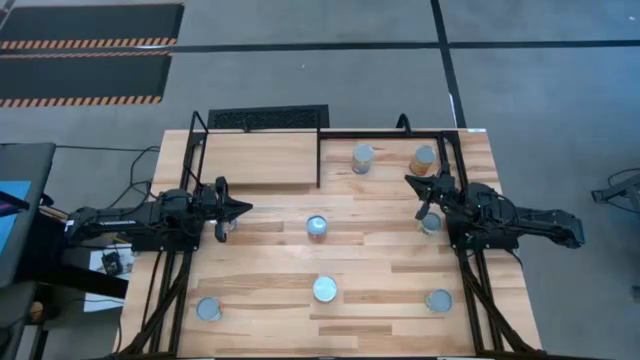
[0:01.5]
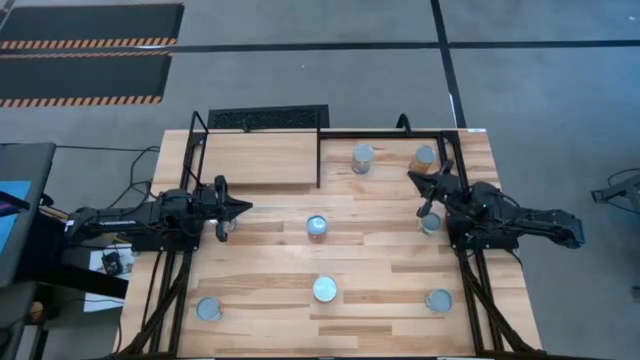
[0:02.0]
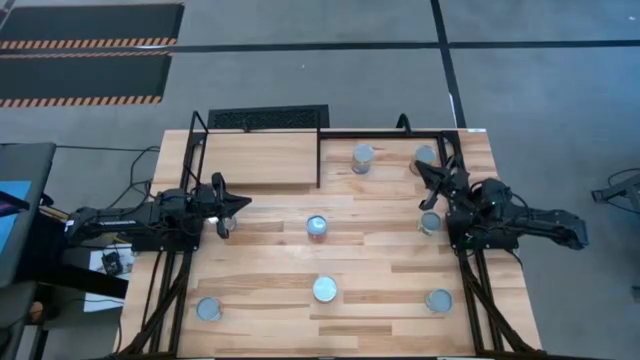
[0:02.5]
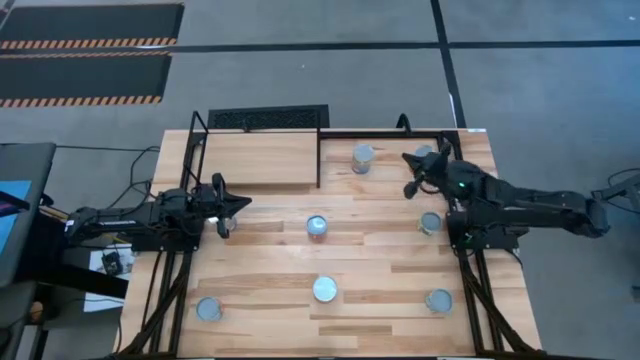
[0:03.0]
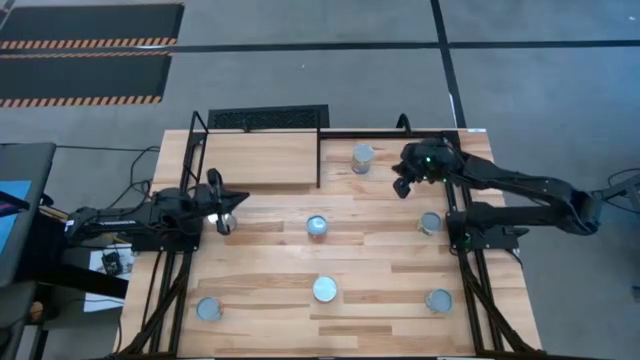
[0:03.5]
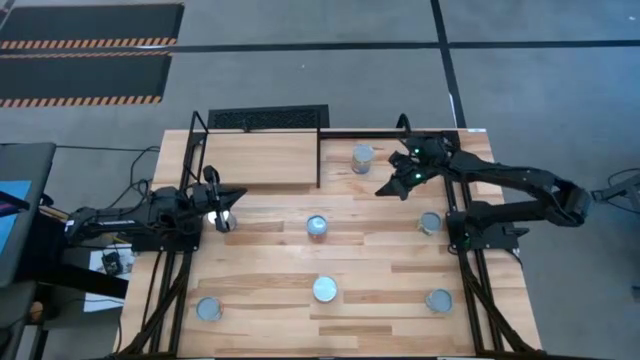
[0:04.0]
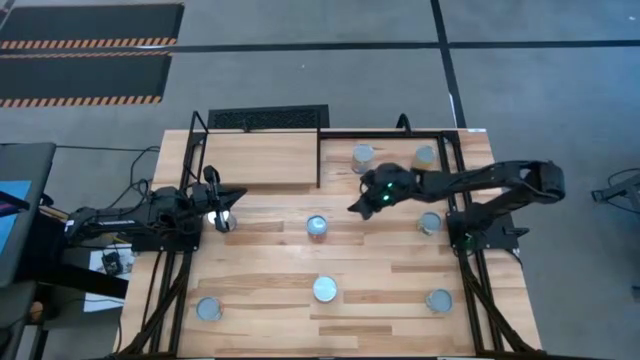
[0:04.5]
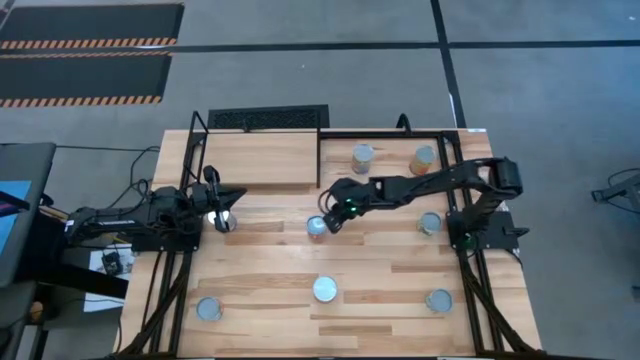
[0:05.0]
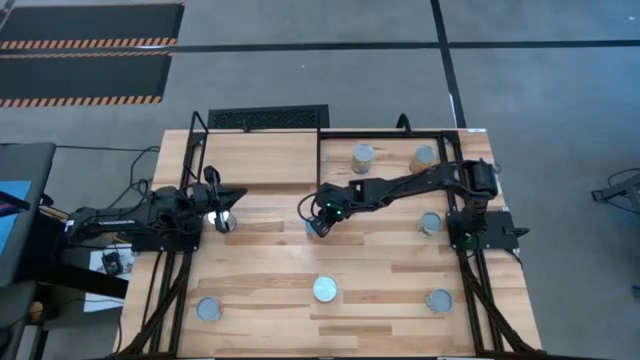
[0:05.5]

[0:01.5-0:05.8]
Task: Pick and place cans onto a shelf
Put the canned corn on the shelf

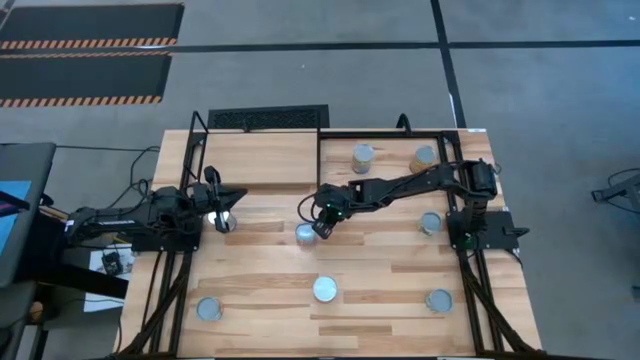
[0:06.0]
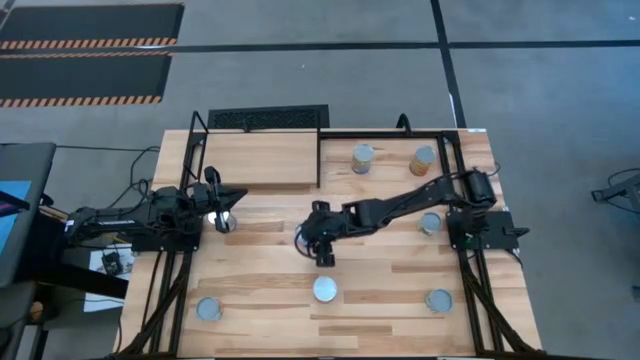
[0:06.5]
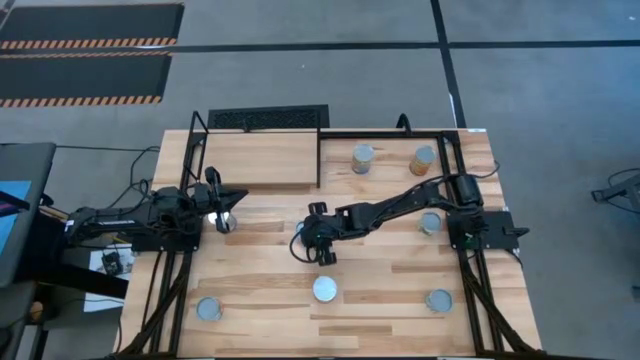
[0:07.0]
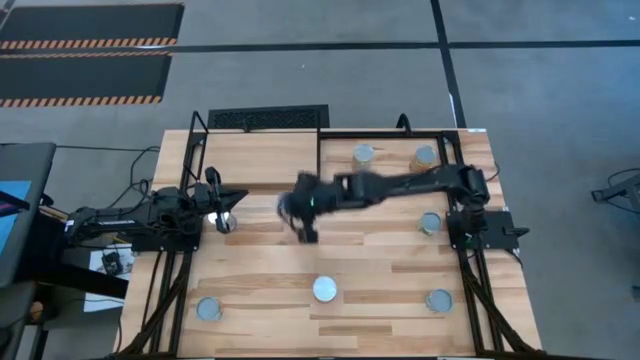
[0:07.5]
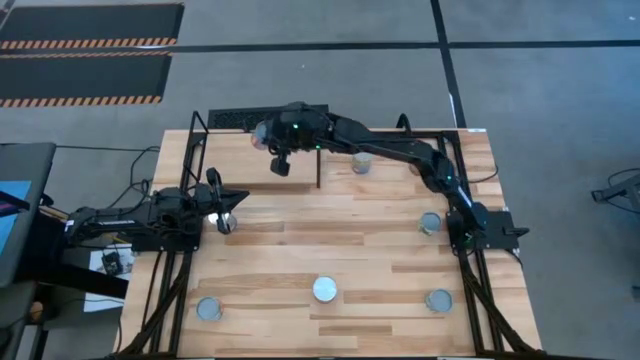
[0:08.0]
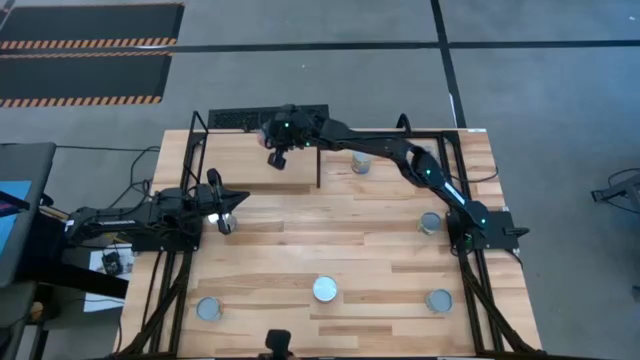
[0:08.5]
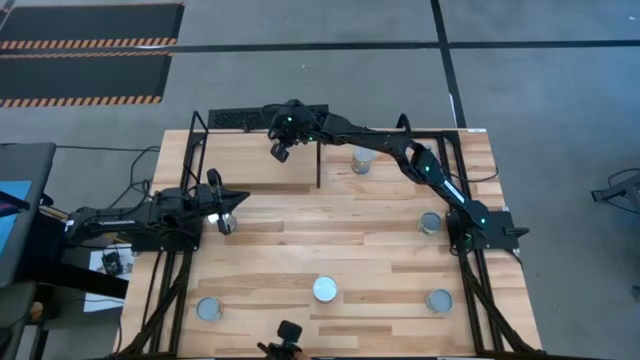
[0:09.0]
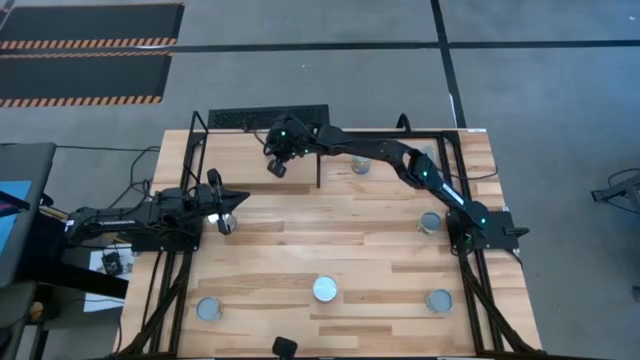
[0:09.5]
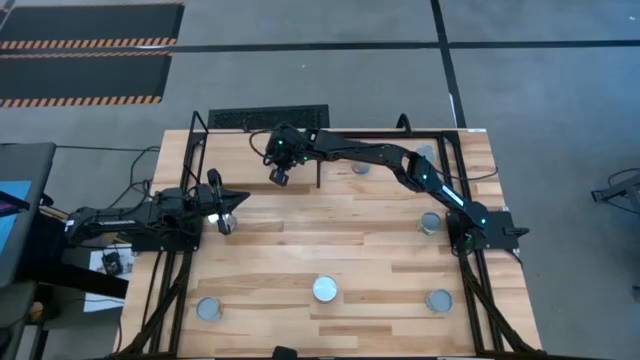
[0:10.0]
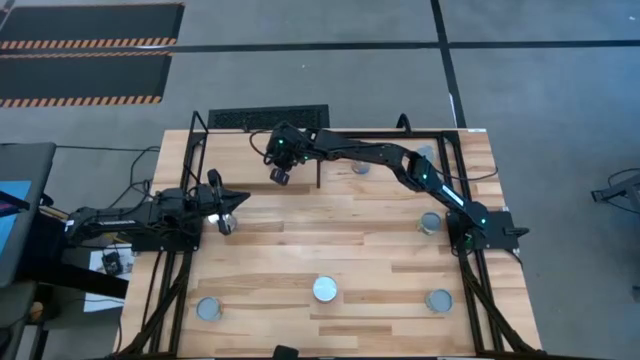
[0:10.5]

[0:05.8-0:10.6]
Put the canned corn on the shelf

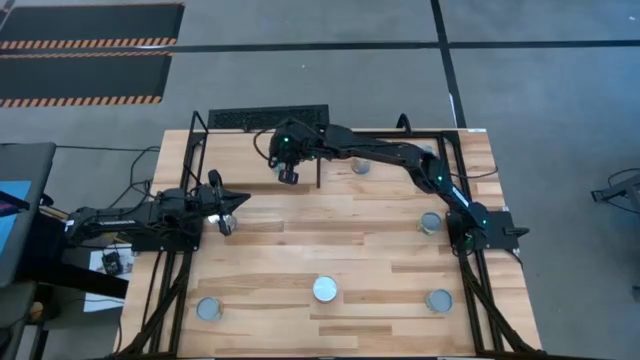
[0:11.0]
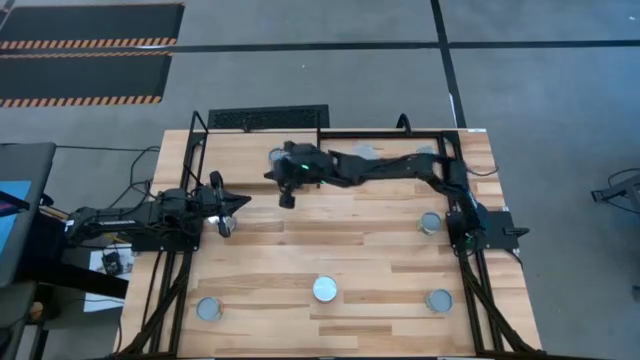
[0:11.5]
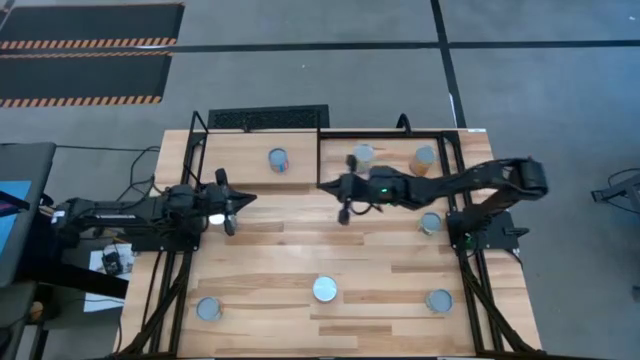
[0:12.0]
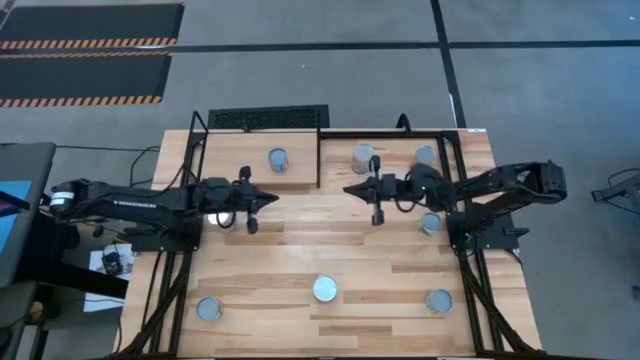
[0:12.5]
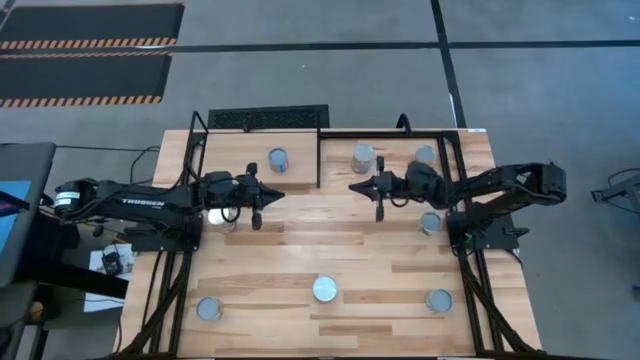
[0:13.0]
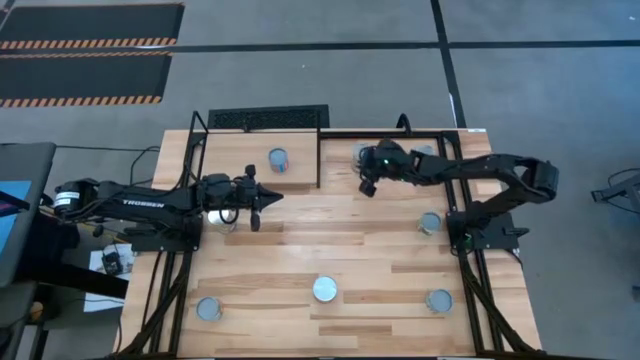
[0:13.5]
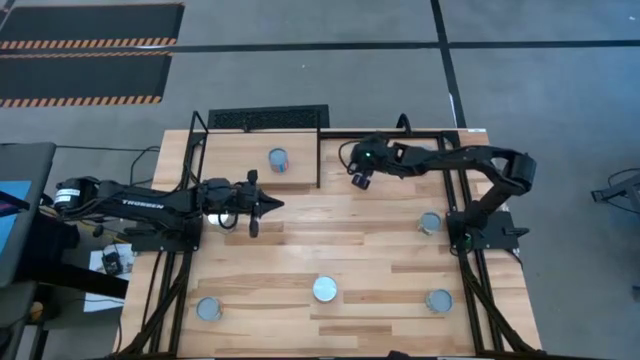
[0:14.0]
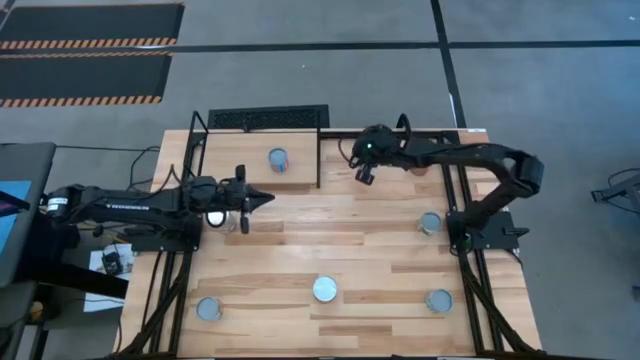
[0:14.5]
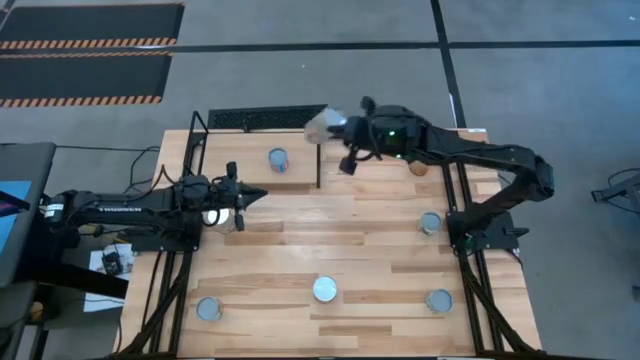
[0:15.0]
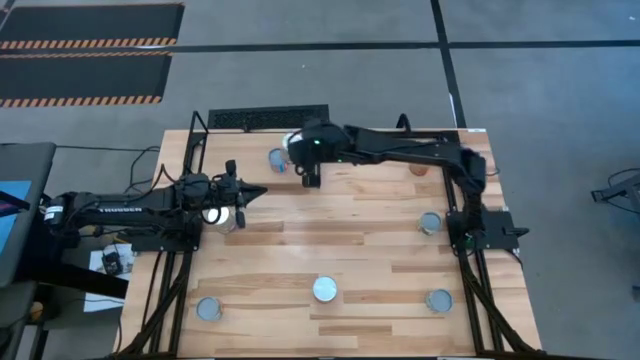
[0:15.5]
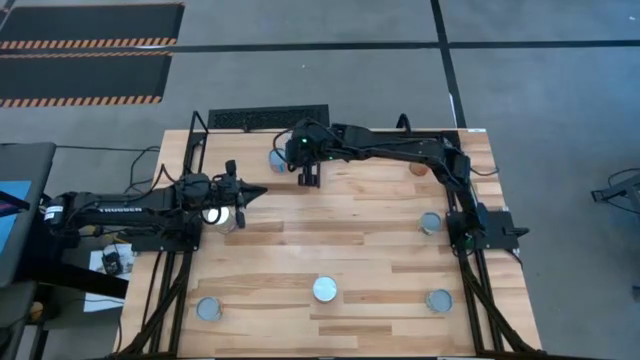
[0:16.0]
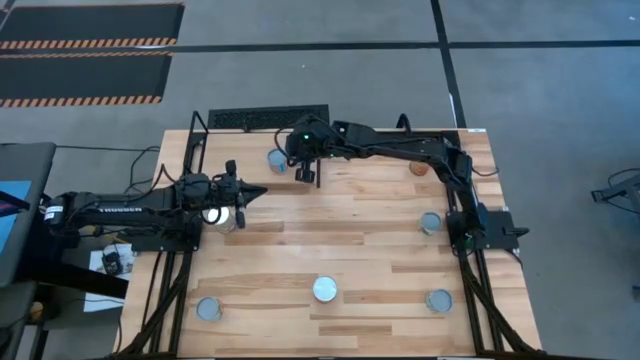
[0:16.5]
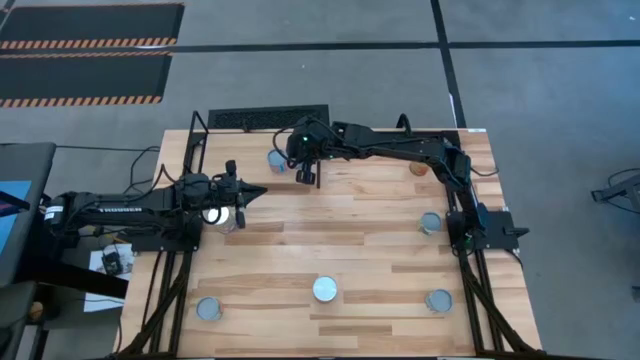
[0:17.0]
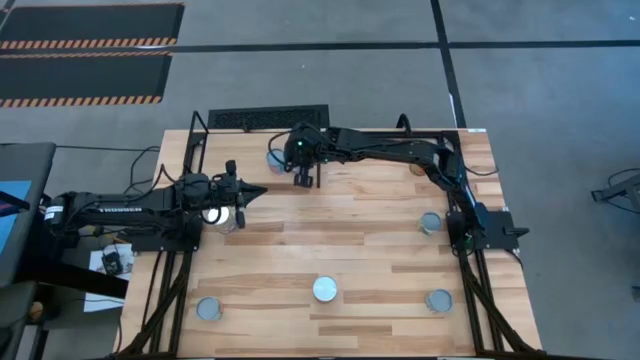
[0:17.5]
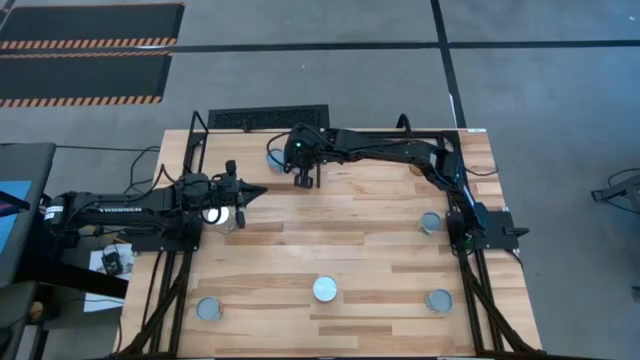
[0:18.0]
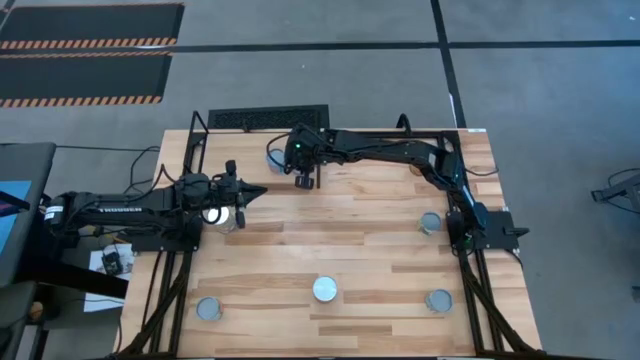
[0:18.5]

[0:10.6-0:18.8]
Put the canned peaches on the shelf

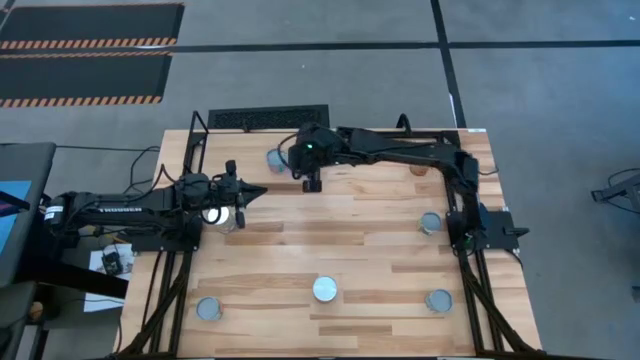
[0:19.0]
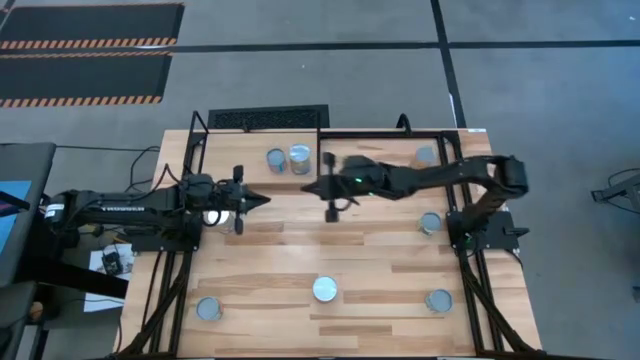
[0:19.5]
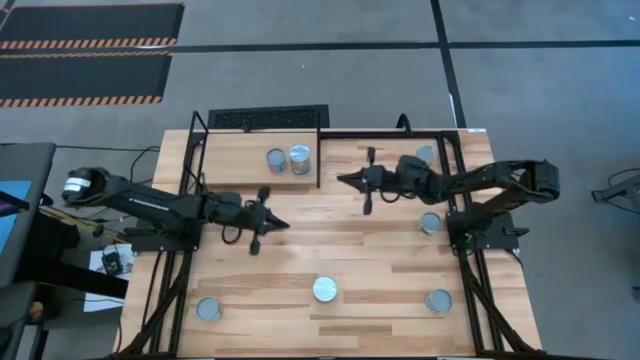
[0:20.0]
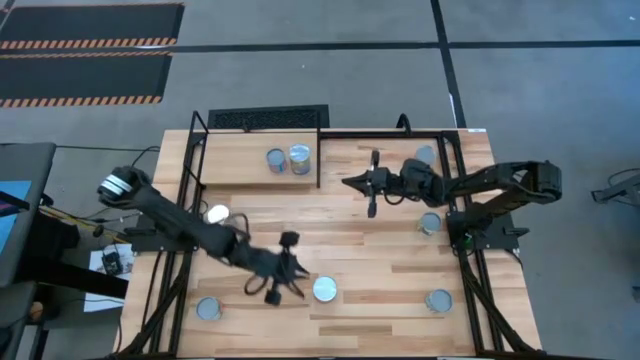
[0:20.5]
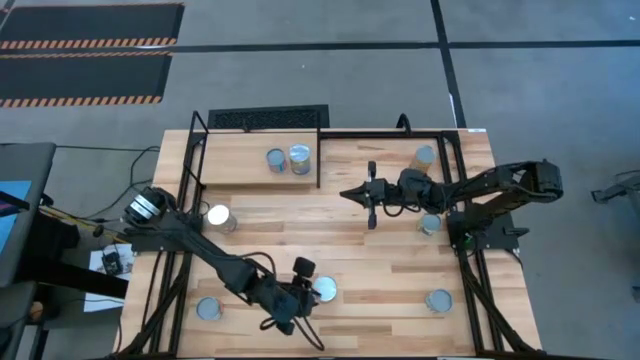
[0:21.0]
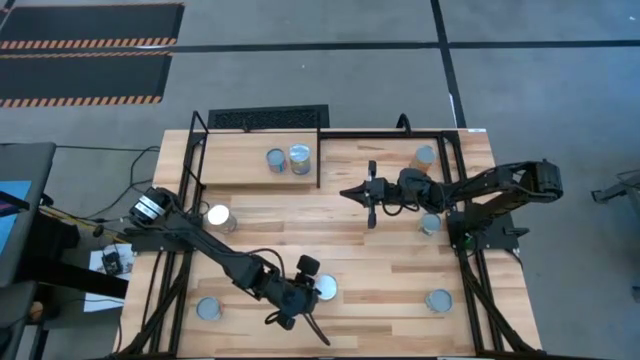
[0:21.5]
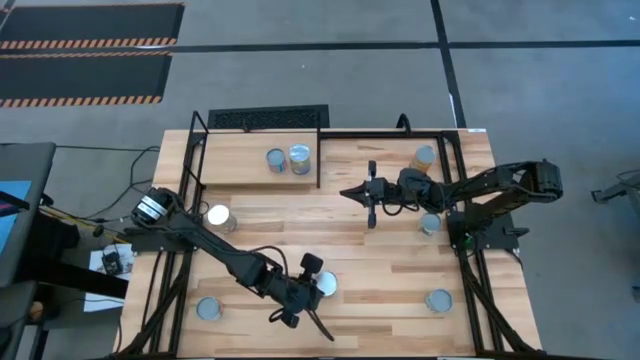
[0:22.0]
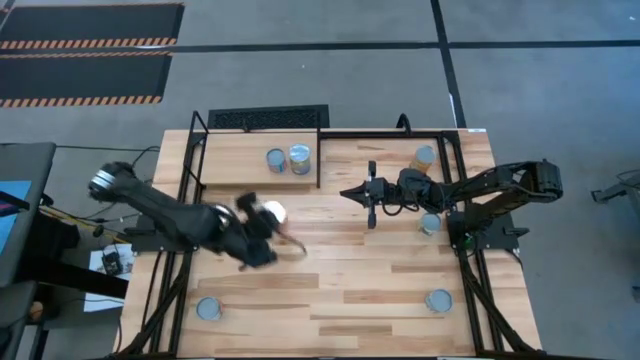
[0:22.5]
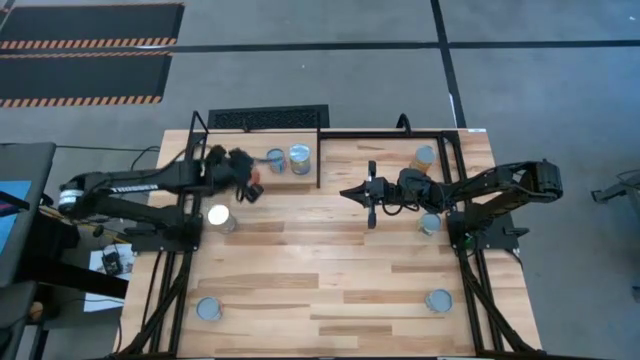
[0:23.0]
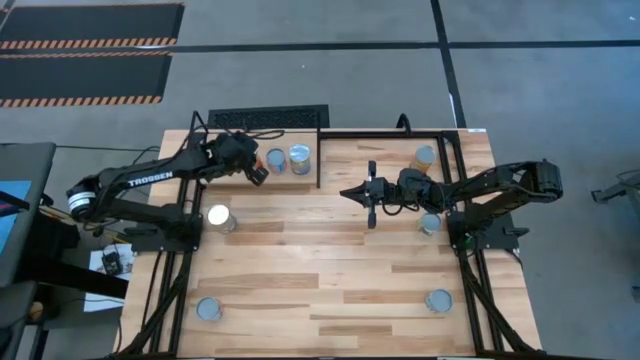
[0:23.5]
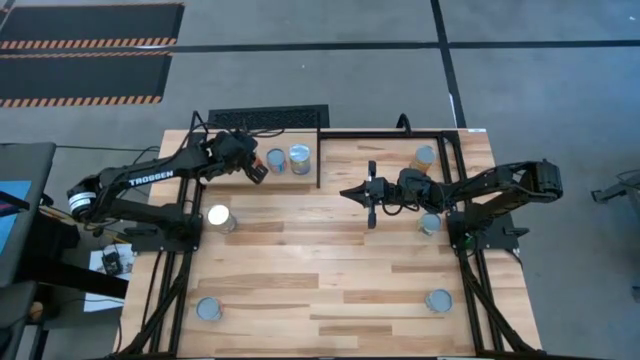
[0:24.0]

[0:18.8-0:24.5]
Put the canned corn on the shelf
